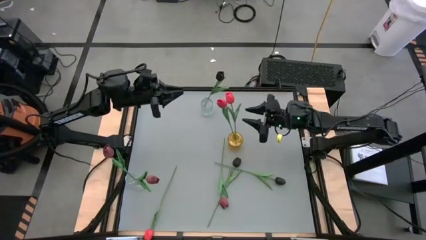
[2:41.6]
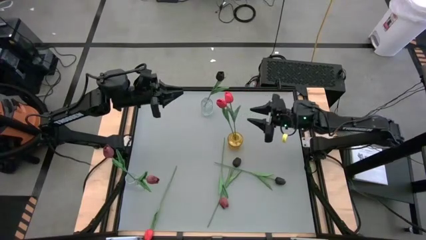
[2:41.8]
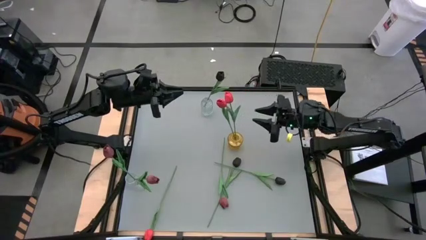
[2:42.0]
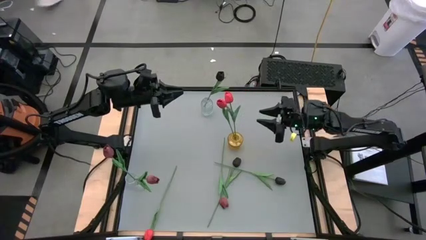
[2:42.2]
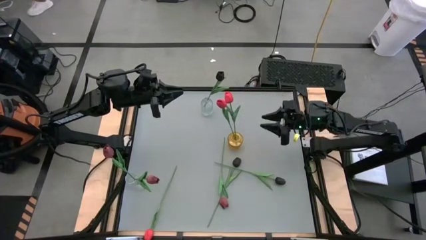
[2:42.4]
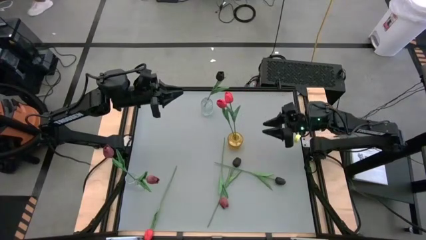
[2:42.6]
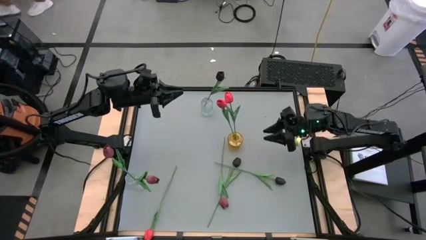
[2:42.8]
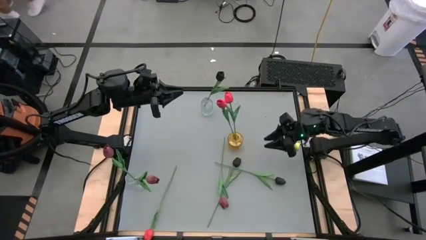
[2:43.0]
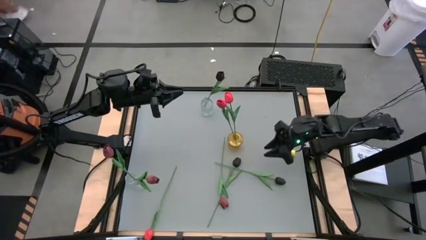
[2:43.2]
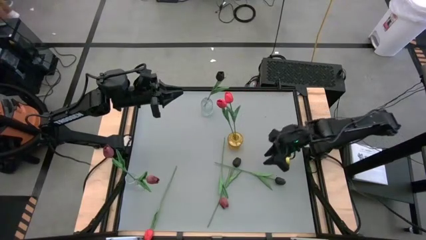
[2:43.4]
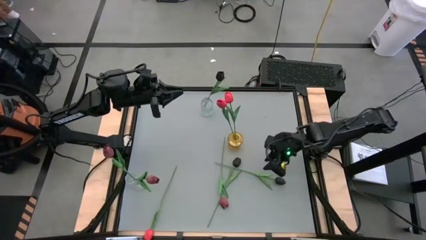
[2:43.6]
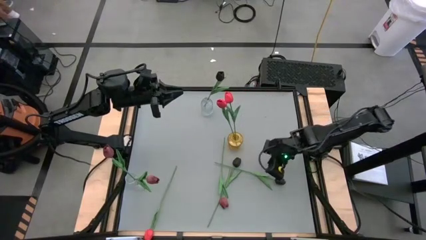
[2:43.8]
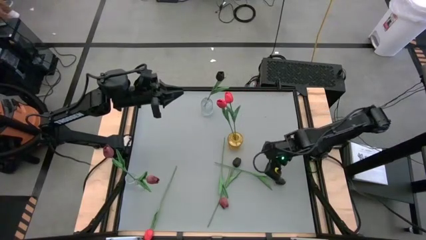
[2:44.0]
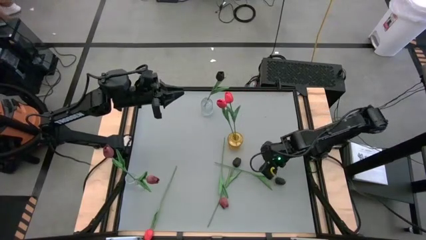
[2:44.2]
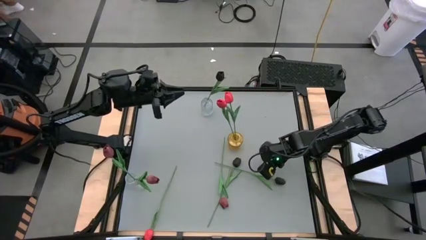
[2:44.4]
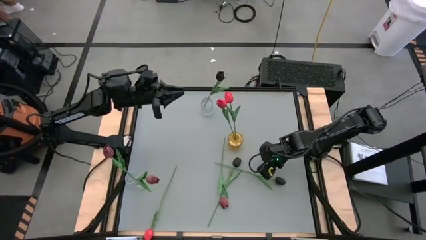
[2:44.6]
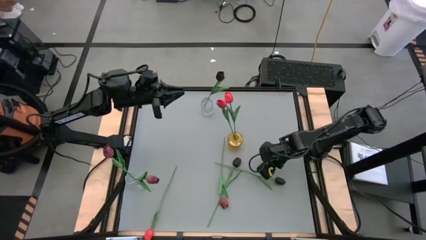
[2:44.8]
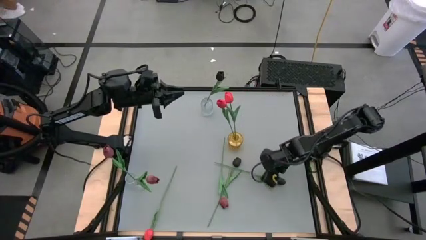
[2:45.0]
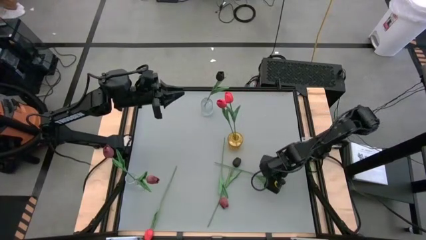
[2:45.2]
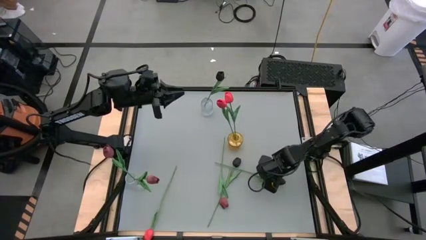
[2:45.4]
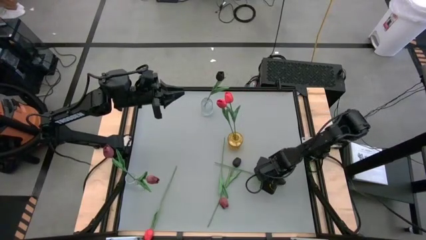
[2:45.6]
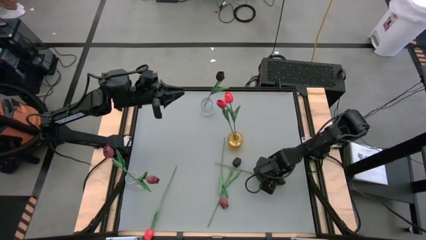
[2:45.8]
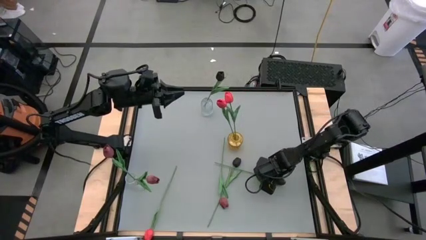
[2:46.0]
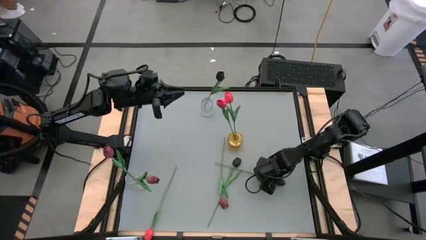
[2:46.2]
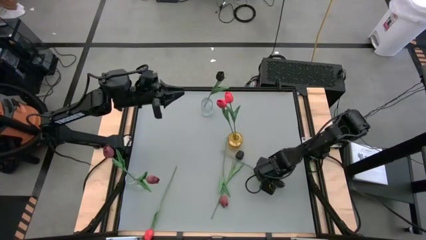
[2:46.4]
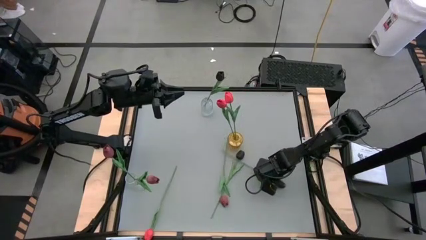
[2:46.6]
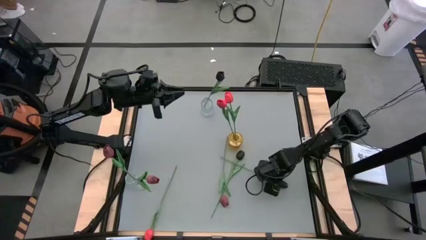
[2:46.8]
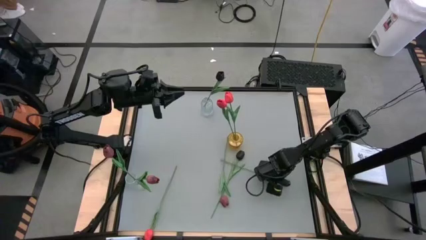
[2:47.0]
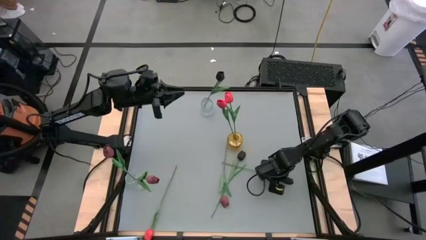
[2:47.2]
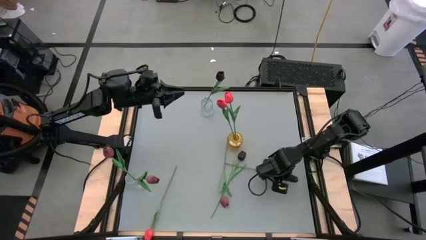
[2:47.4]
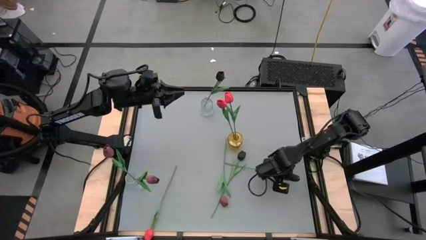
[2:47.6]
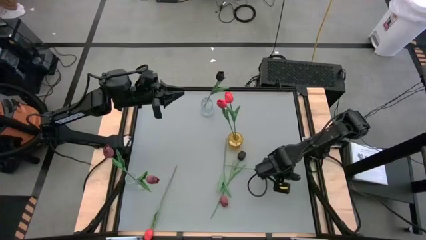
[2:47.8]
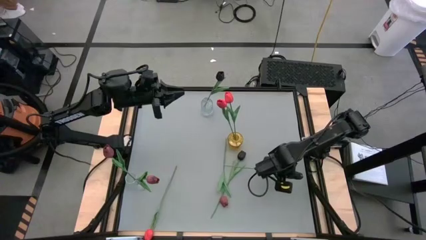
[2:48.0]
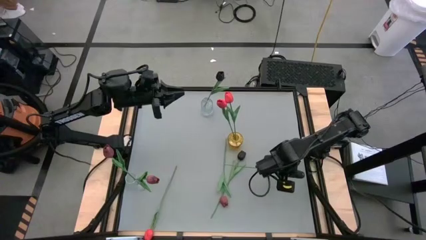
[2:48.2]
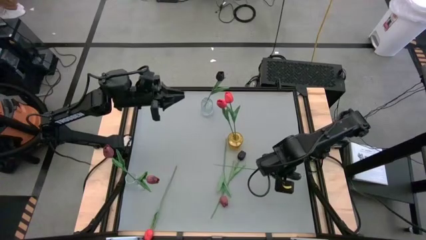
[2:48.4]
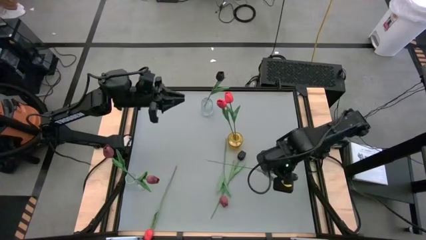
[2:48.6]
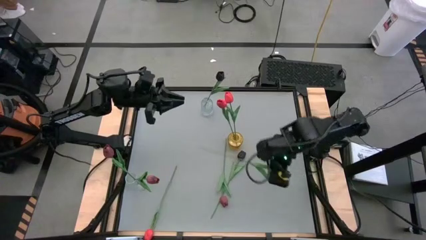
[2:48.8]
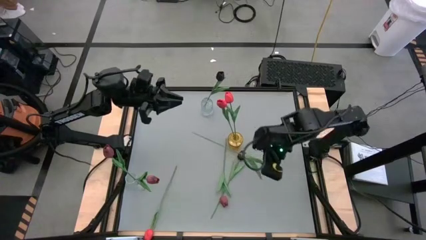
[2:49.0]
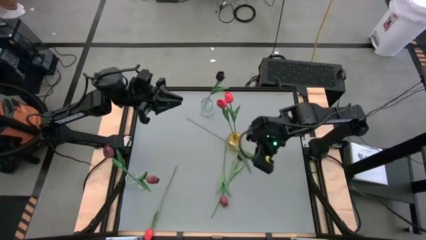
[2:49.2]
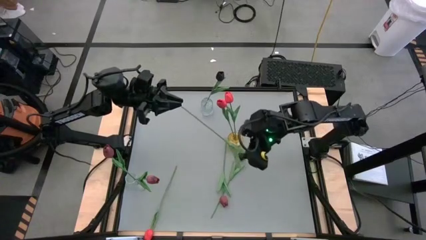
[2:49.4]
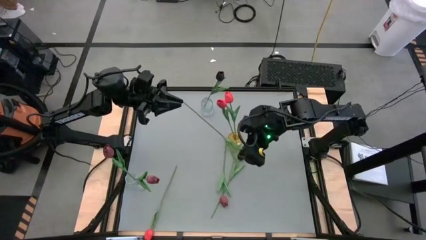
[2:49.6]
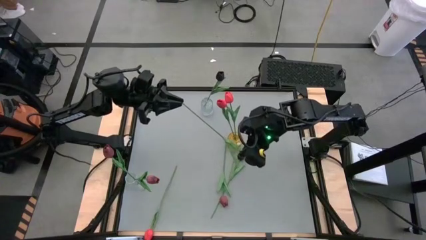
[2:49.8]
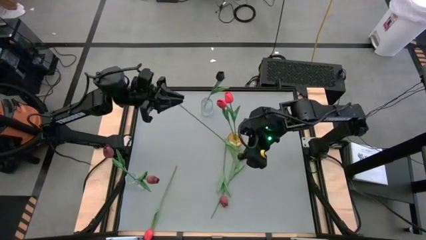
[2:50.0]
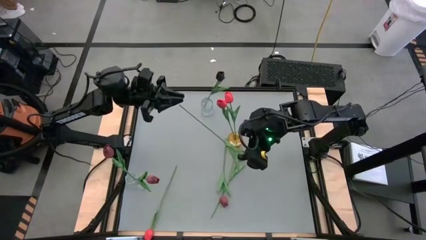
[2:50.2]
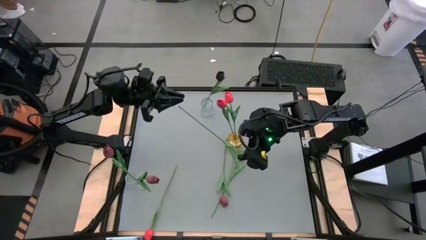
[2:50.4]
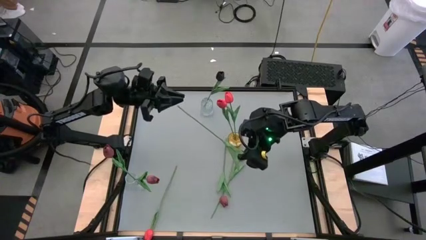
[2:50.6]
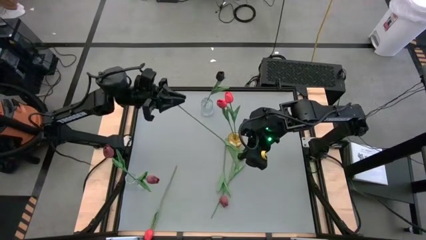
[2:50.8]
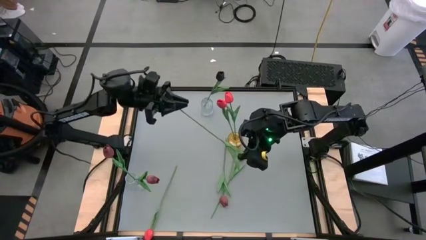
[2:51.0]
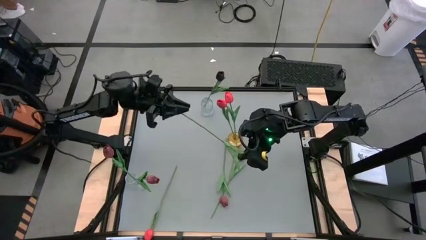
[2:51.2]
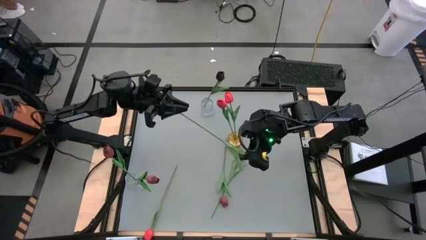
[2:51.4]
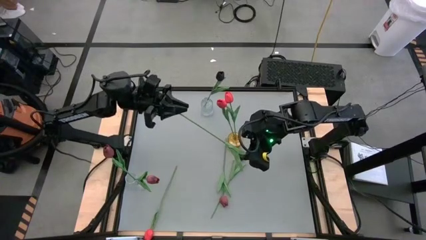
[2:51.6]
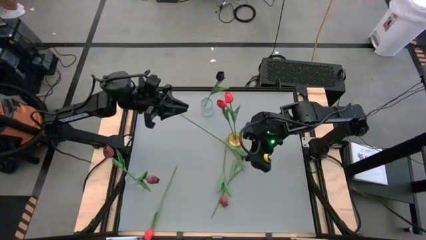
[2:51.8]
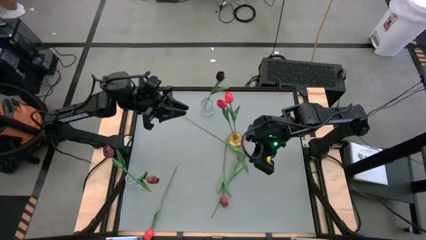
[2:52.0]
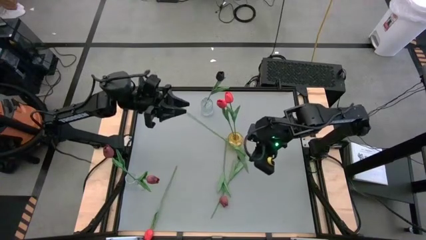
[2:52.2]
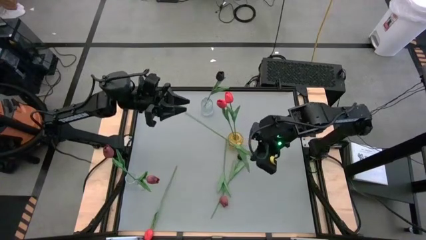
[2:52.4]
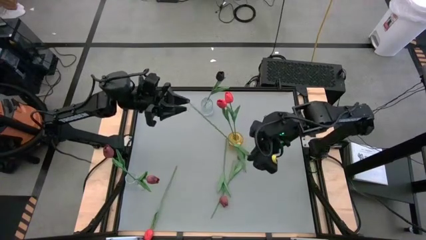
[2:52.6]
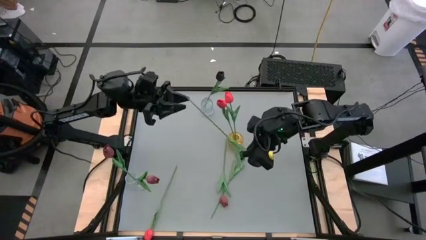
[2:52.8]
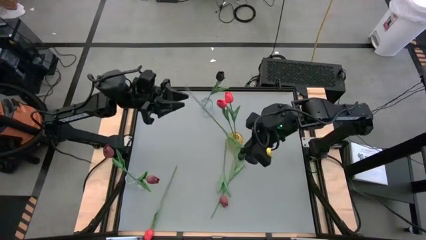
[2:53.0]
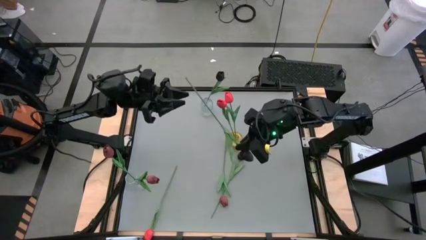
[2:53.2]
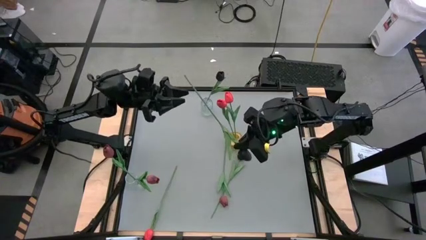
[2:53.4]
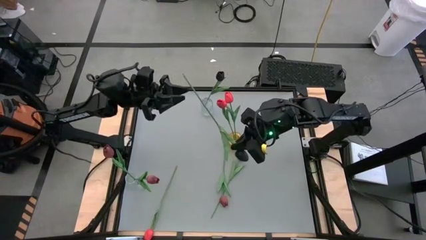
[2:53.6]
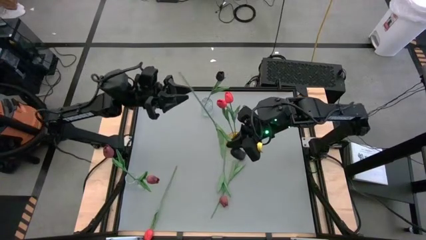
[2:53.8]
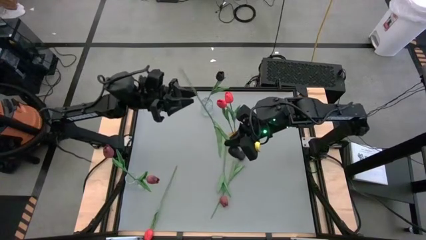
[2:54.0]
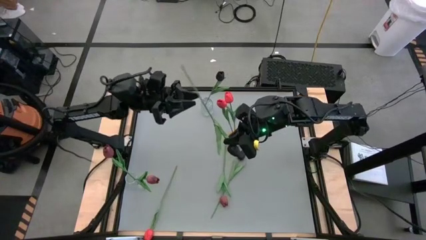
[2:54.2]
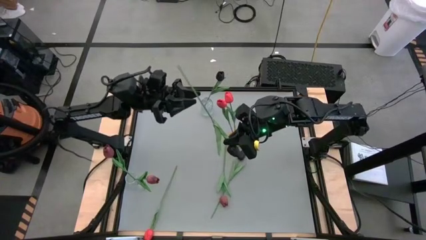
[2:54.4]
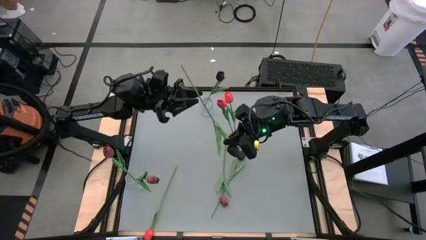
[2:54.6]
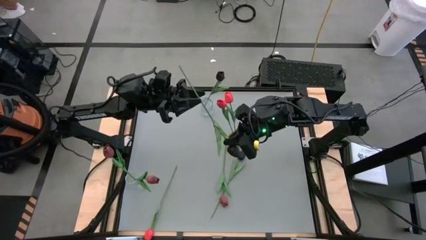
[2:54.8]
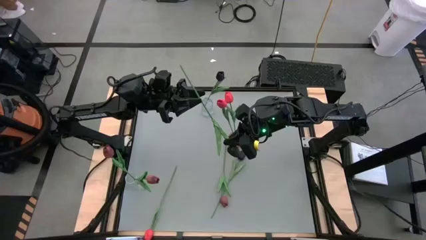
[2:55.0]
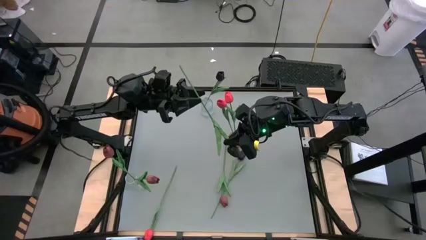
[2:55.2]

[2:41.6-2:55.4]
Task: Sort flowers into vase by color
Put the right black tulip into the top transparent vase

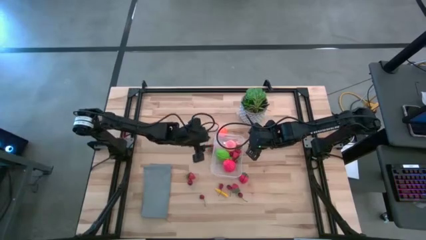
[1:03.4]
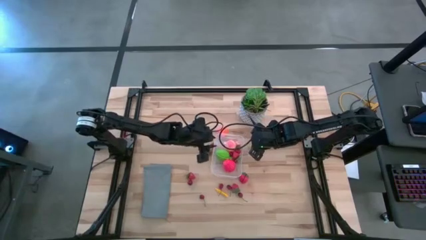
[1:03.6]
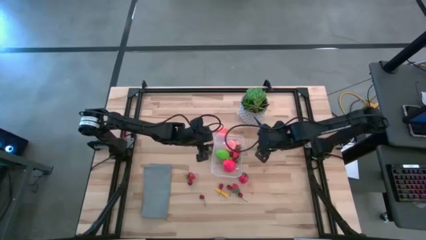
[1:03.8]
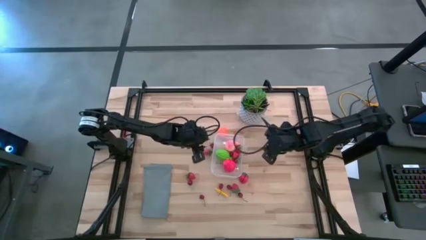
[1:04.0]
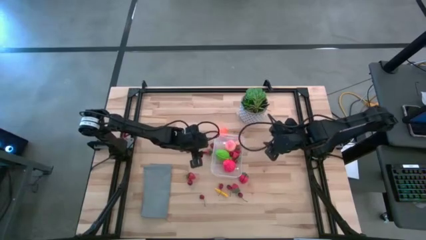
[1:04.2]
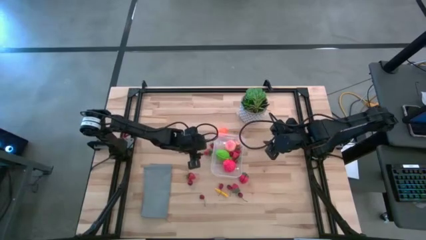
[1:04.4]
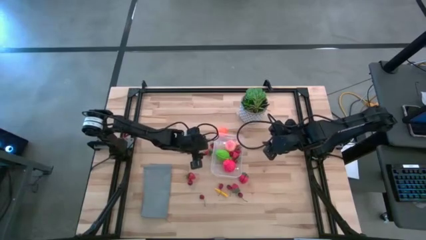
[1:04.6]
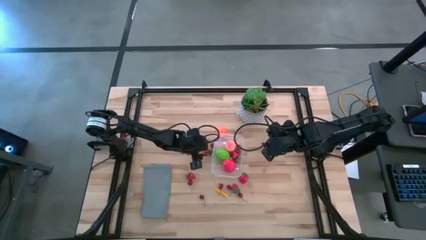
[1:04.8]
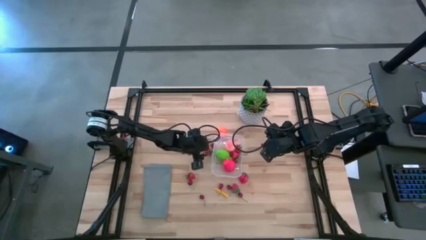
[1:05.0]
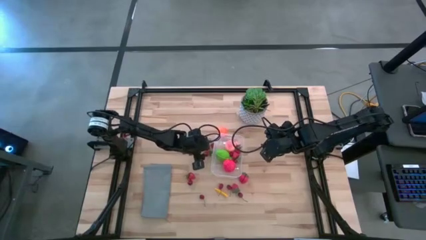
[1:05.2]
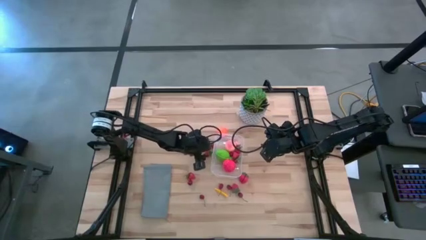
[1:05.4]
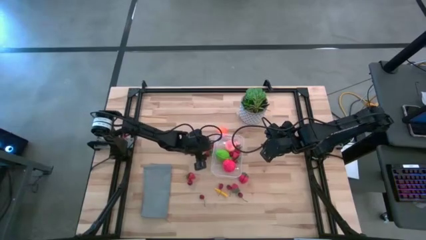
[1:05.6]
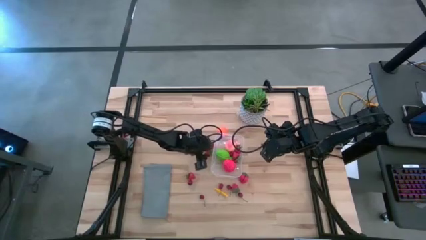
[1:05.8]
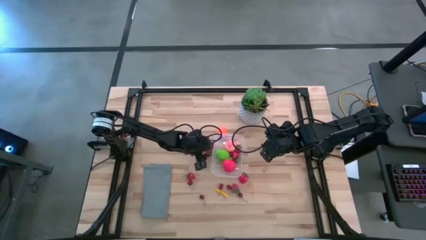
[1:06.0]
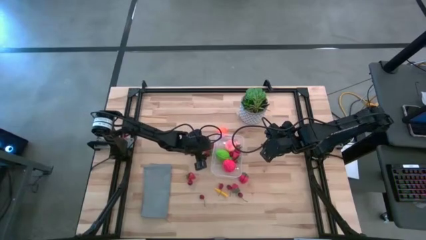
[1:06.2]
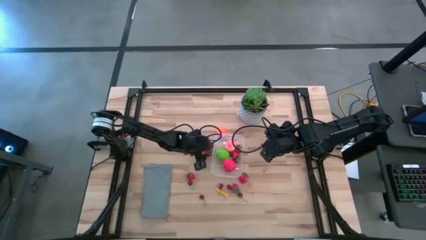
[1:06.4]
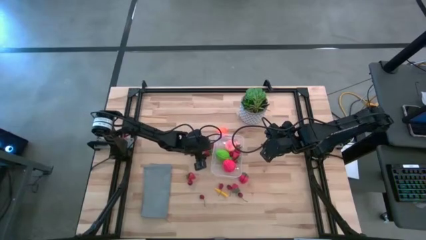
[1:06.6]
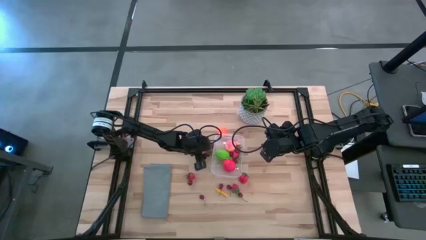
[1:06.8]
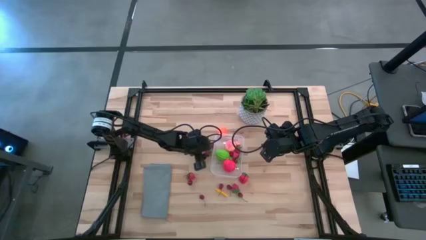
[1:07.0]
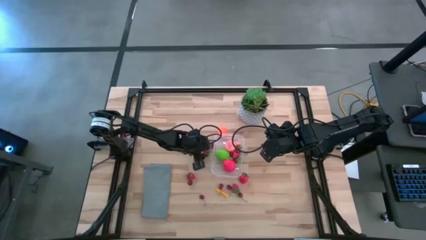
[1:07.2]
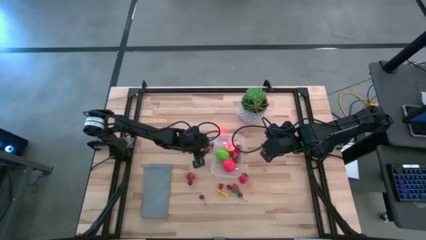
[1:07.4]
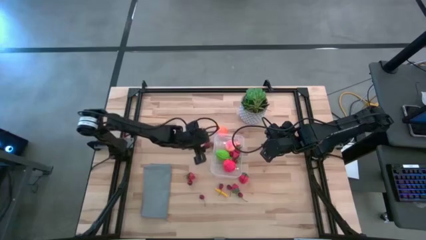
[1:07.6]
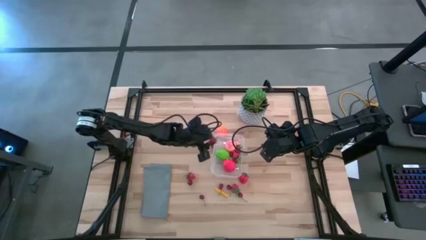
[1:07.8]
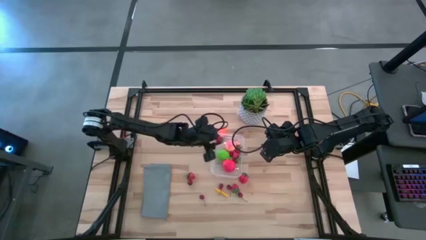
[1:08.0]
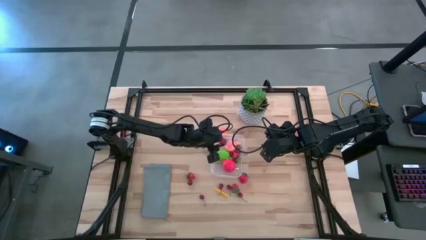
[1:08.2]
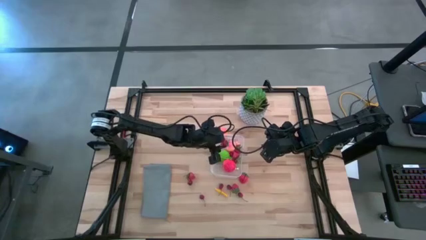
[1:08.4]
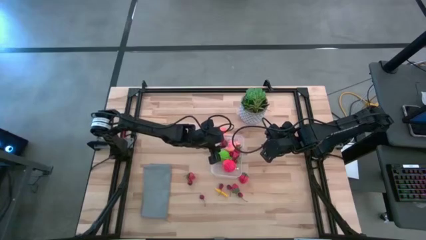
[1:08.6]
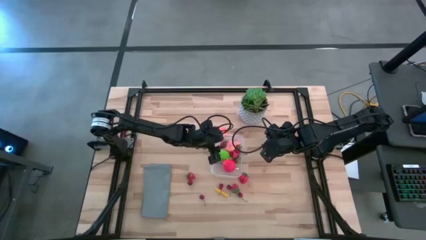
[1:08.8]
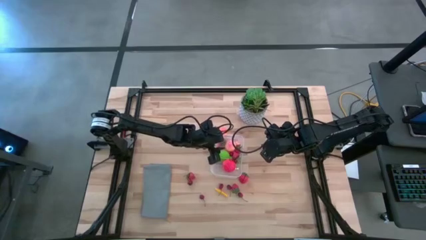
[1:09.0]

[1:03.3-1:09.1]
Task: Pick and placing Produce into tupperware
Put the red strawberry into the transparent bin
